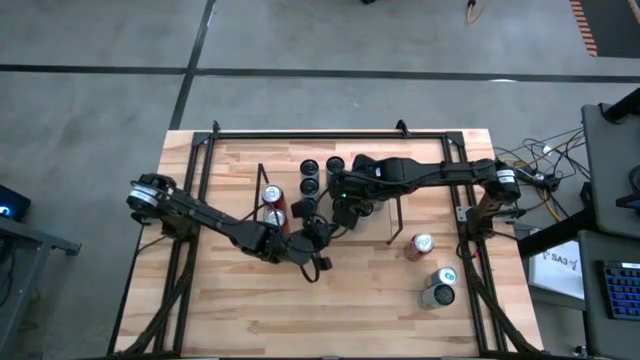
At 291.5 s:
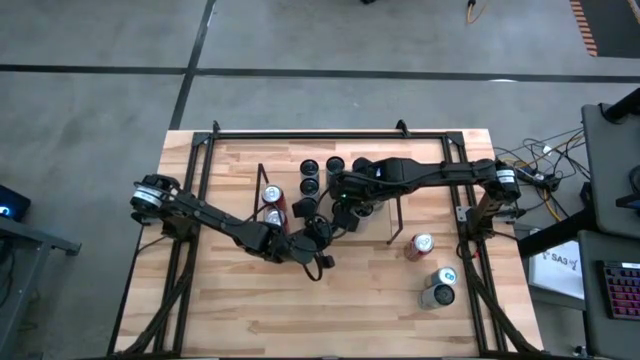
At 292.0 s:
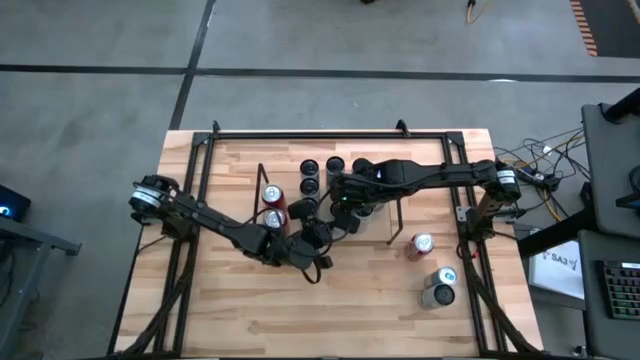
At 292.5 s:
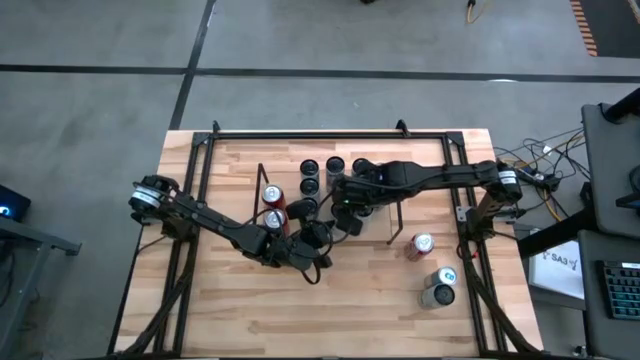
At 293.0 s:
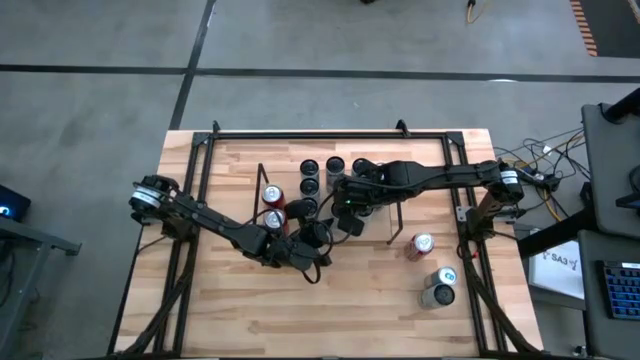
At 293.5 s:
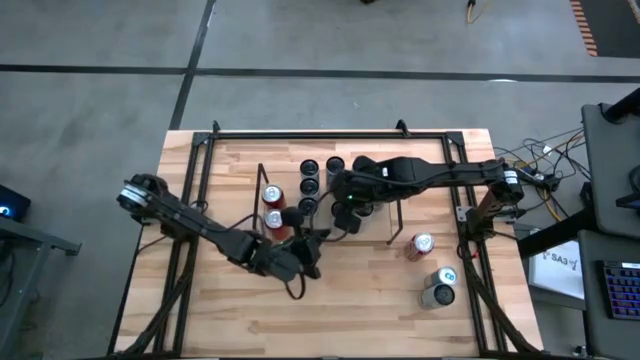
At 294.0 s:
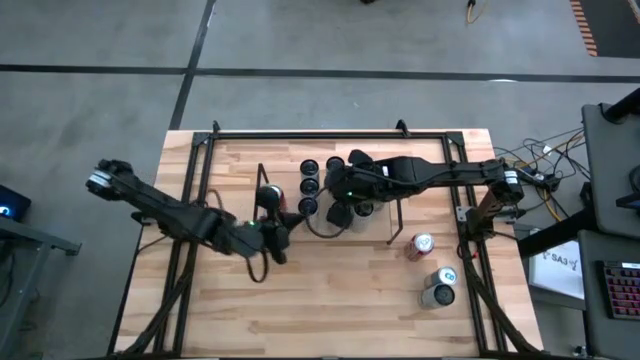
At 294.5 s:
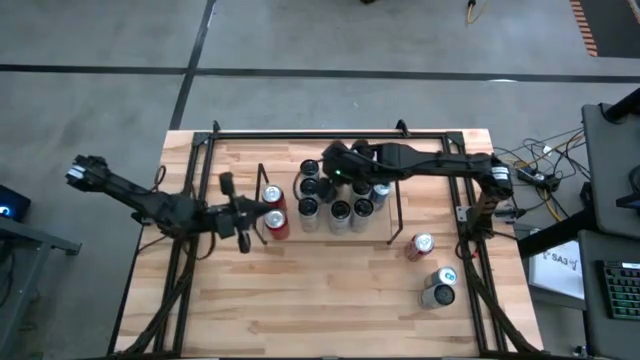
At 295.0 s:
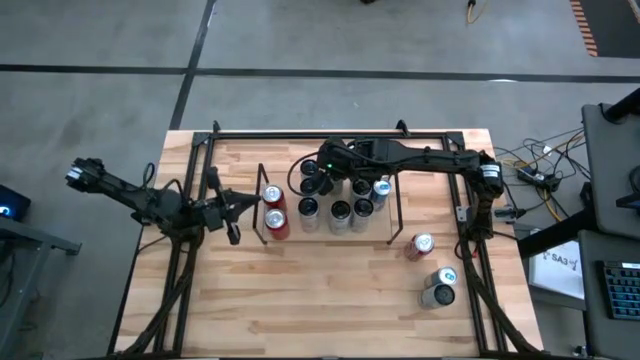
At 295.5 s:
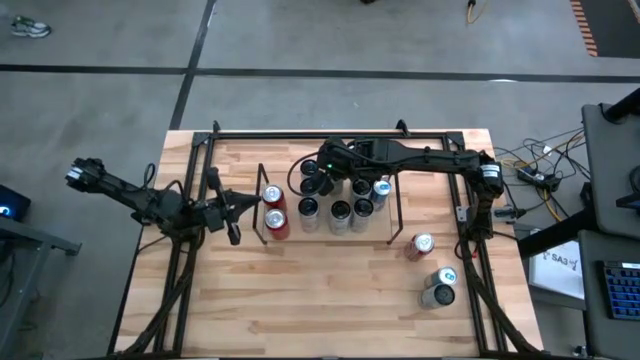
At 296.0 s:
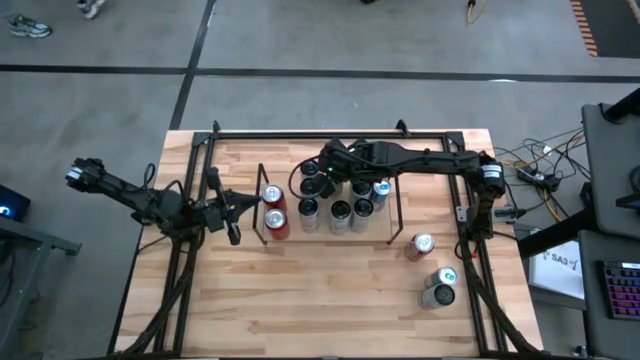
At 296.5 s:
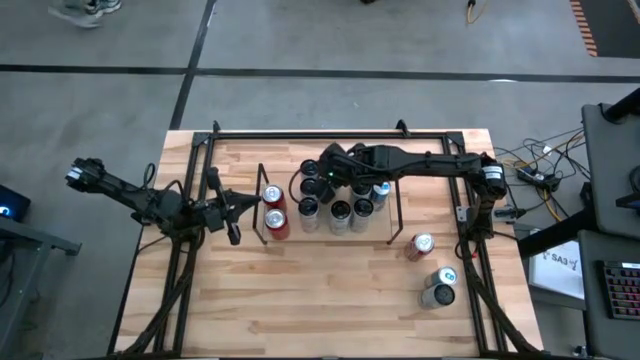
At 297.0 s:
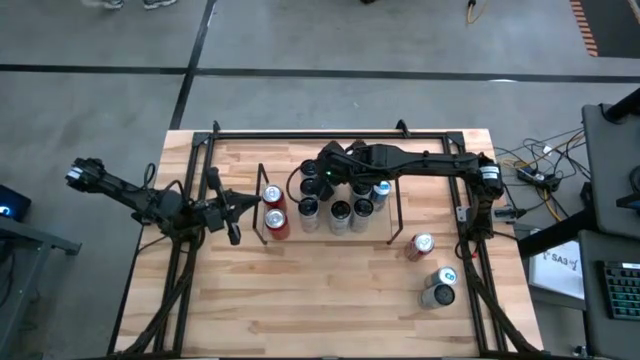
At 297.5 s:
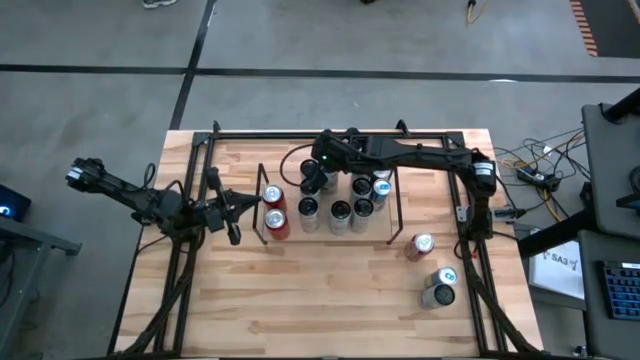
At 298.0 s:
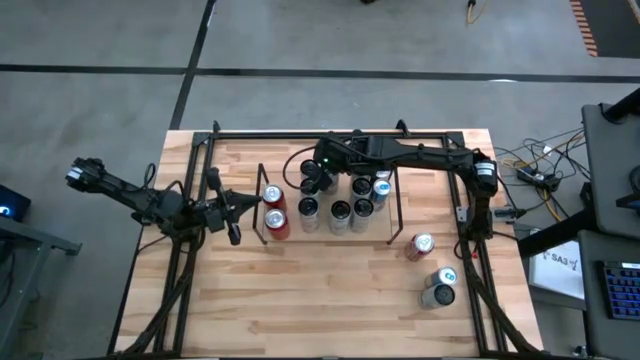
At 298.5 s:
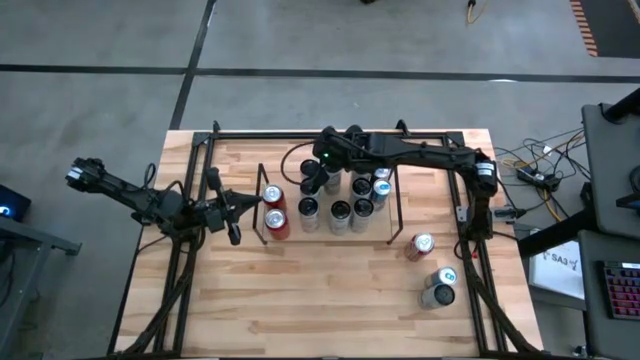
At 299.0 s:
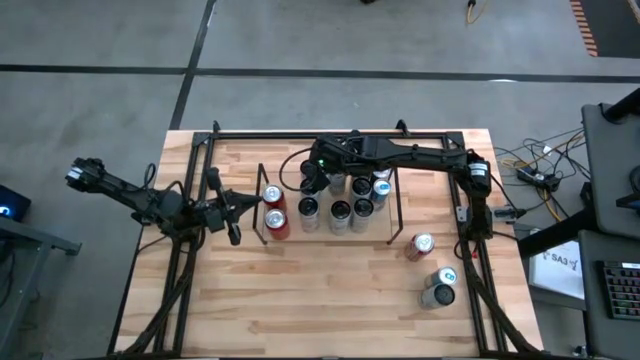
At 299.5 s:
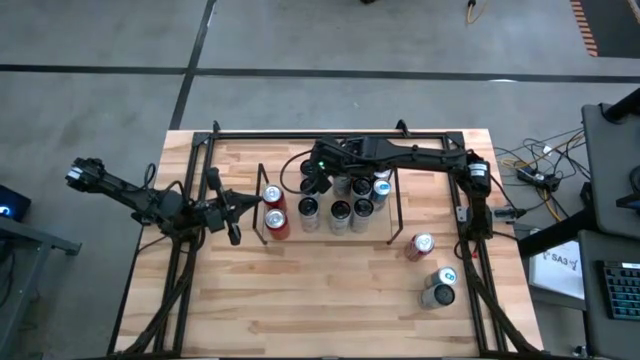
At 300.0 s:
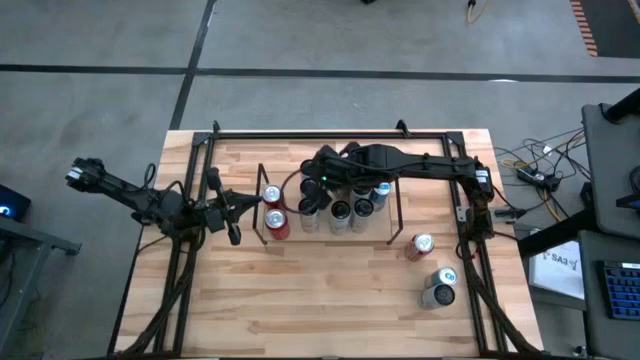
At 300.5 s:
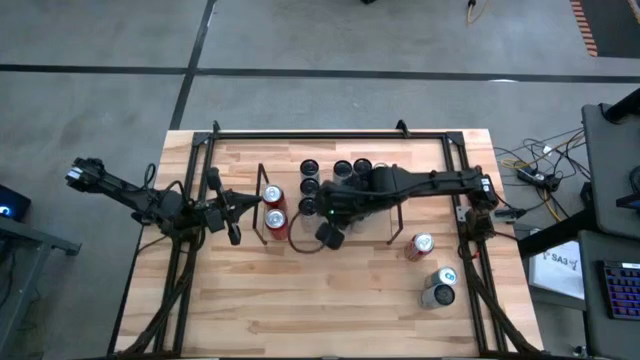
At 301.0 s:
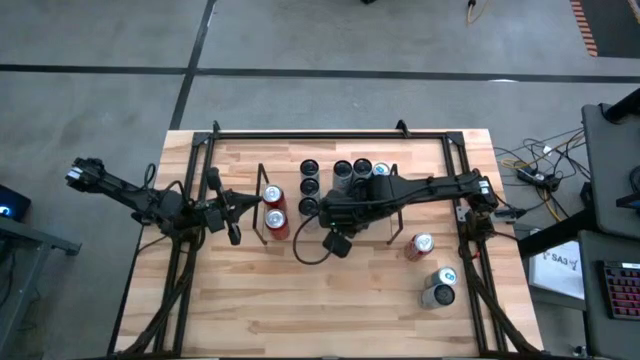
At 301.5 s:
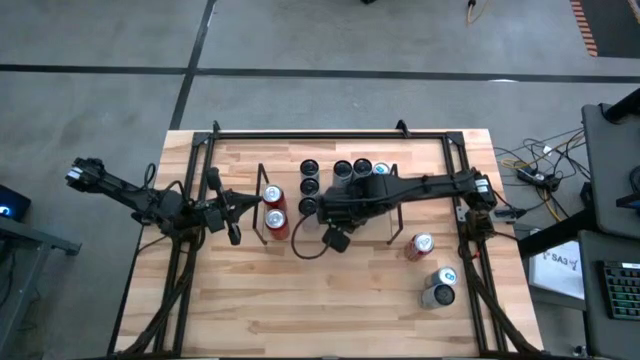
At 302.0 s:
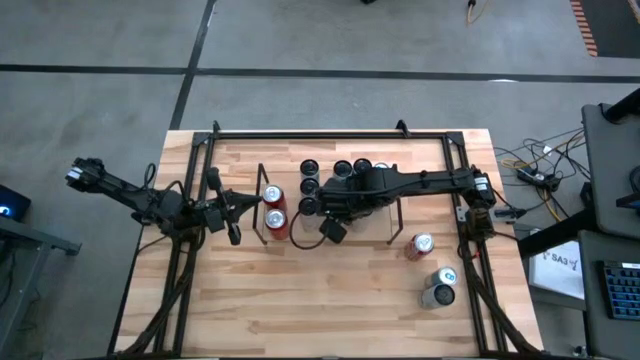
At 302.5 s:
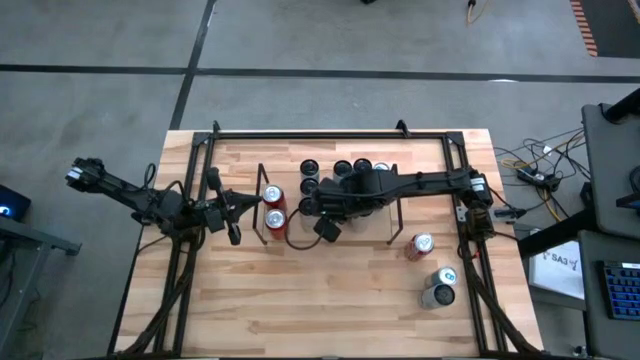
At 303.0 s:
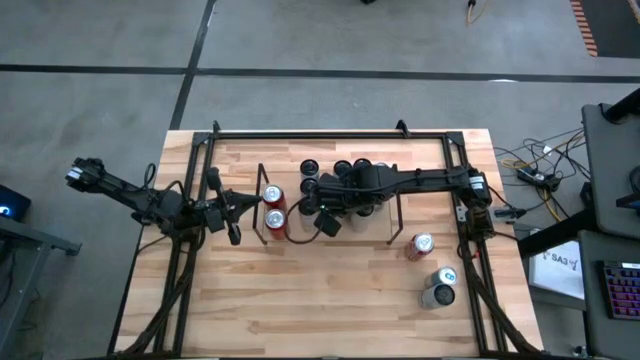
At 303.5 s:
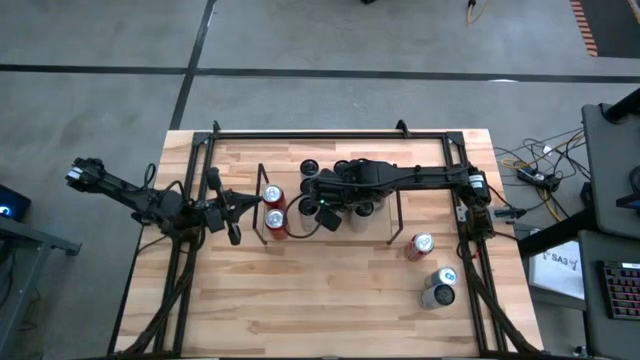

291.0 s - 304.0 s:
Task: Place canned beverage on shelf
Adjust the white and blue soda cans

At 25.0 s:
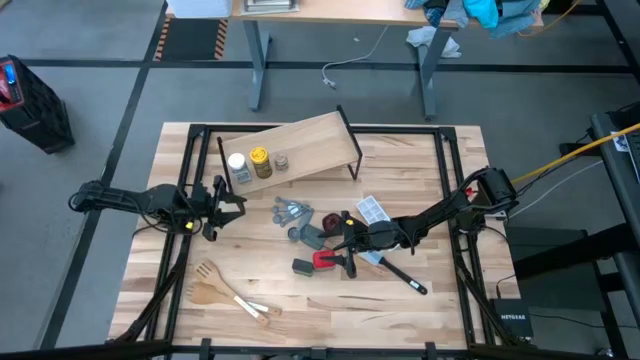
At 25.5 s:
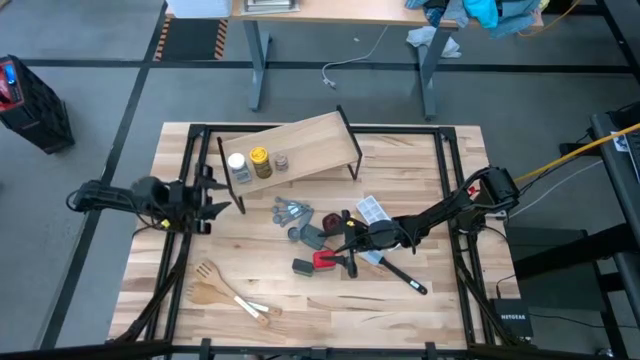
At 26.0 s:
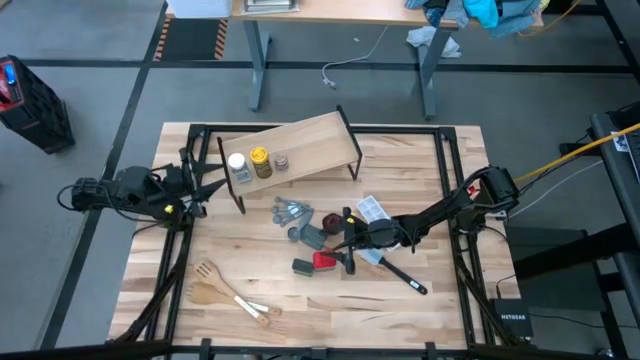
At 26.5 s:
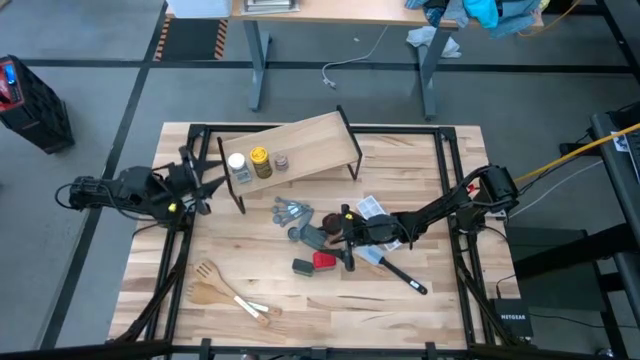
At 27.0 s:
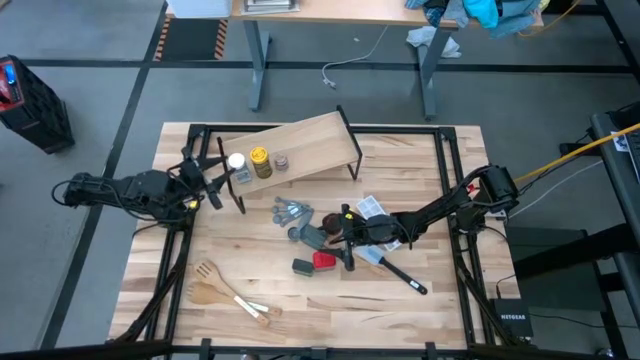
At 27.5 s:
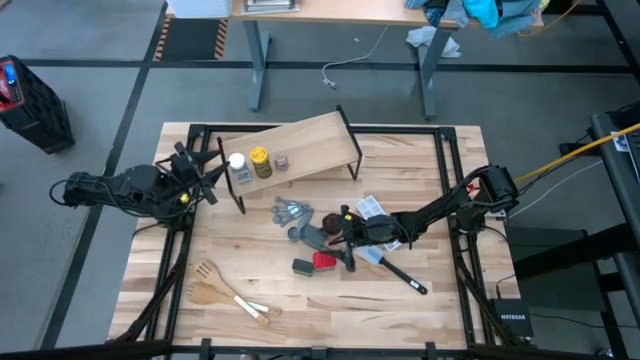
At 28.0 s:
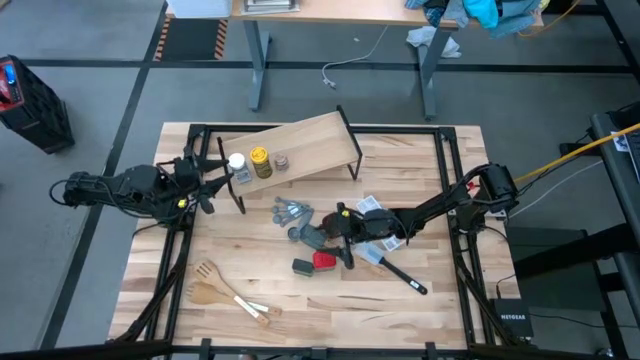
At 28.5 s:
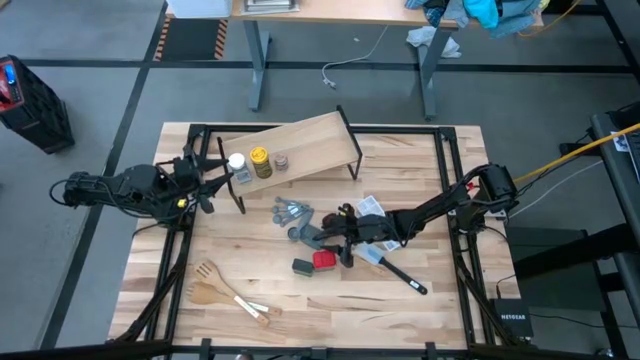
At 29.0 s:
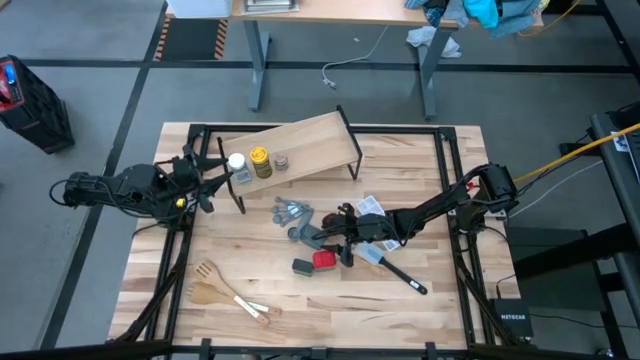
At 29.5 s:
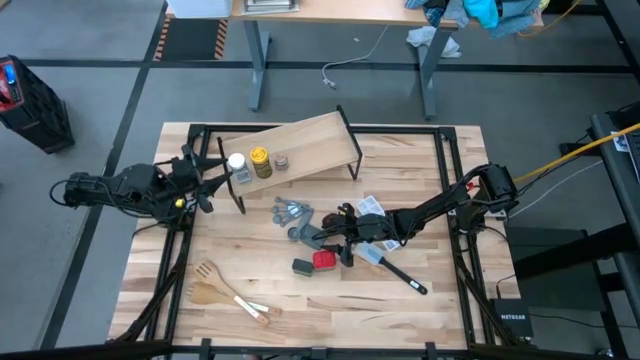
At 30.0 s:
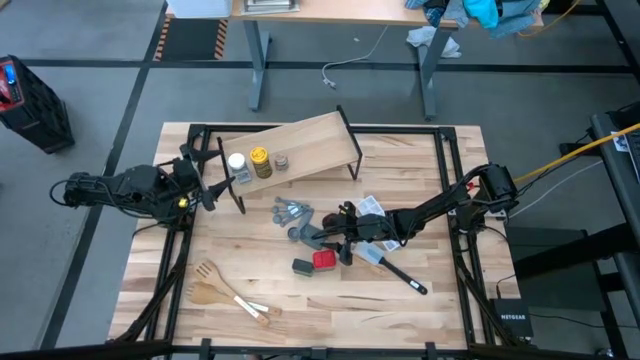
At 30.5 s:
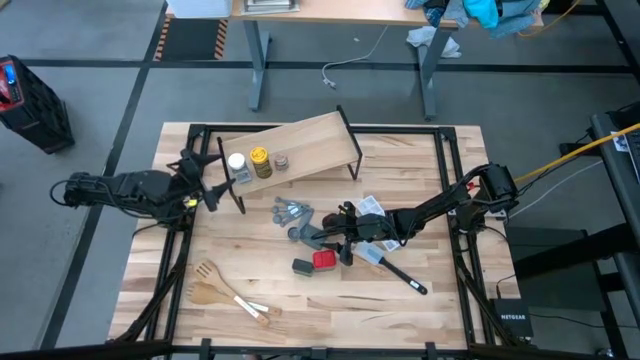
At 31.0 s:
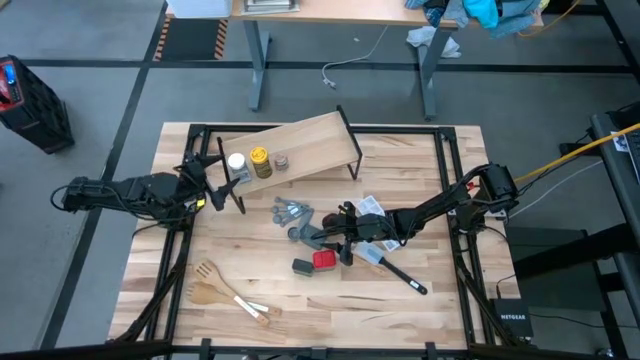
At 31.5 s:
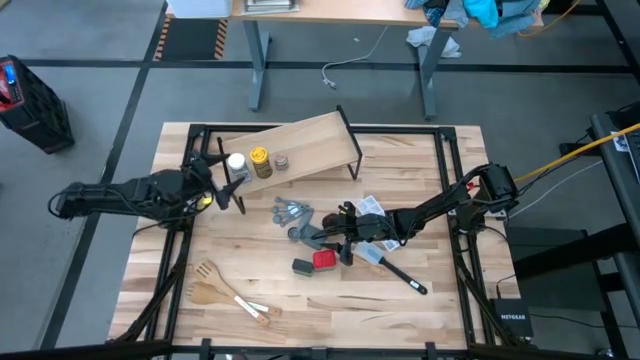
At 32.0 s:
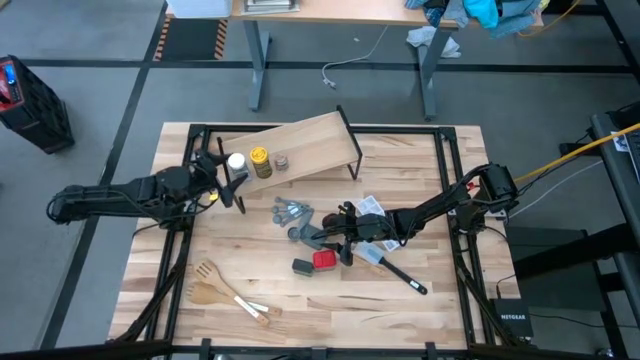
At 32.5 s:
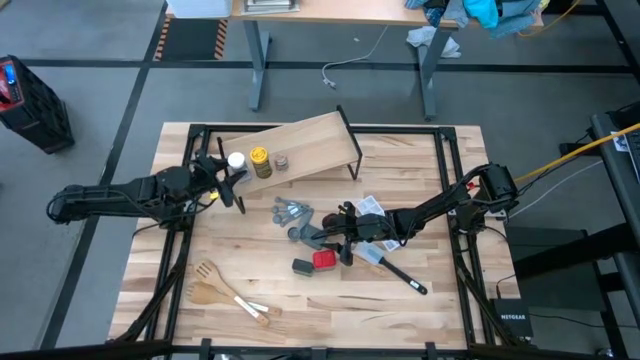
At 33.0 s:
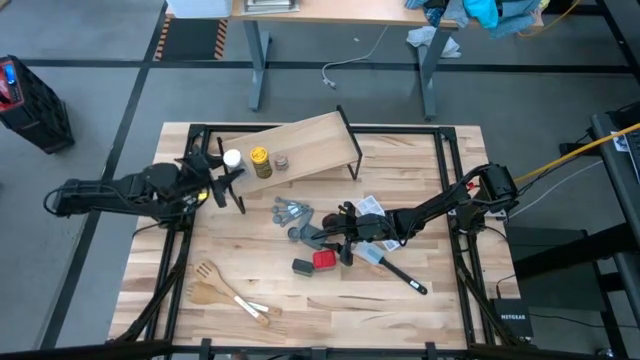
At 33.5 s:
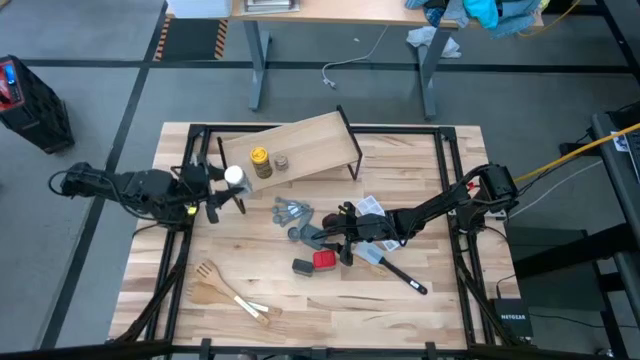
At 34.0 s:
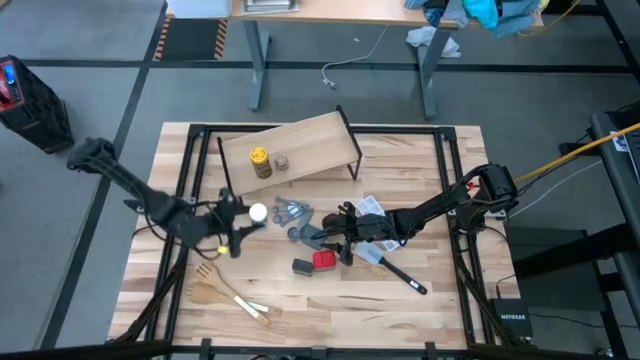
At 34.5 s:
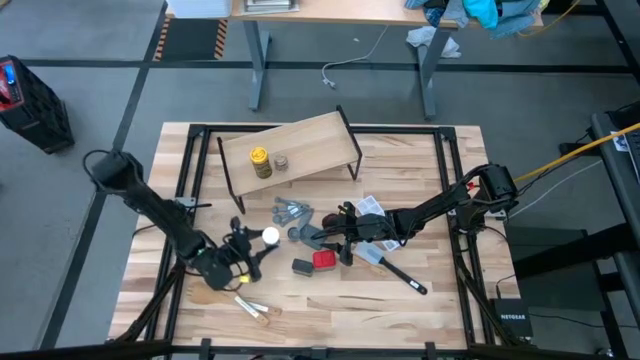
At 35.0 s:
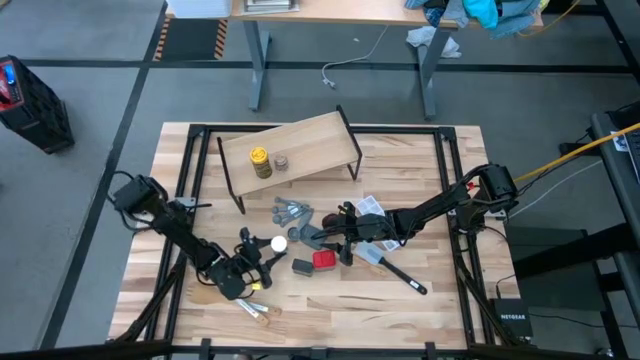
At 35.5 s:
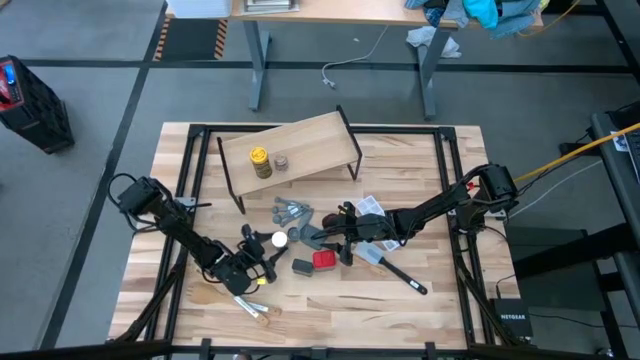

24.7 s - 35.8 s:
Task: Shelf spices
Remove the white seasoning bottle from the shelf
